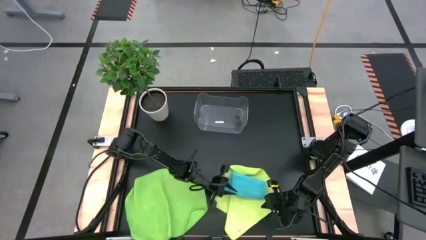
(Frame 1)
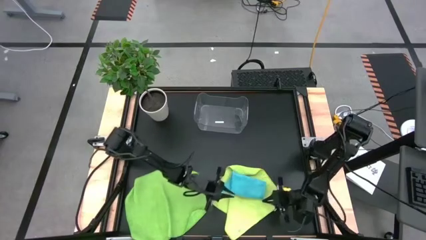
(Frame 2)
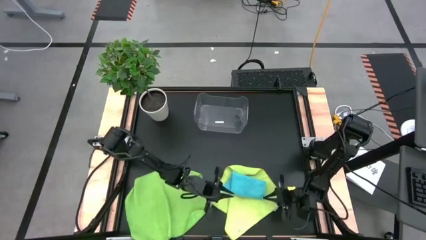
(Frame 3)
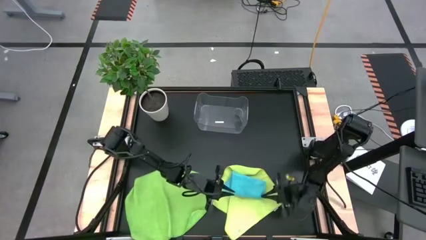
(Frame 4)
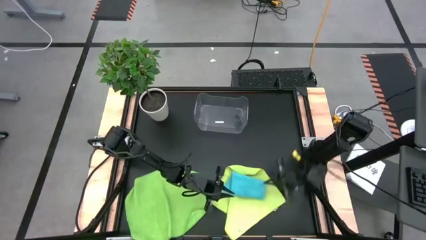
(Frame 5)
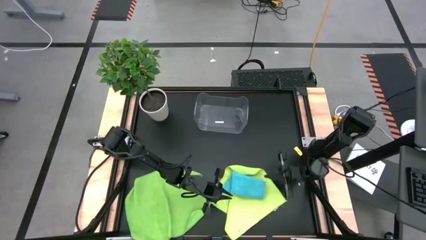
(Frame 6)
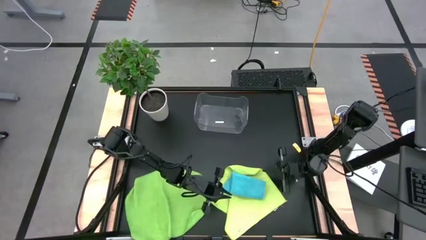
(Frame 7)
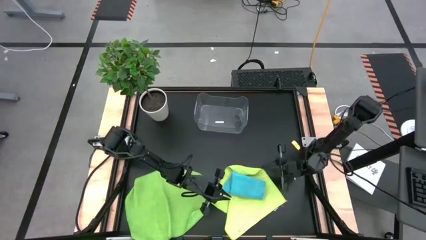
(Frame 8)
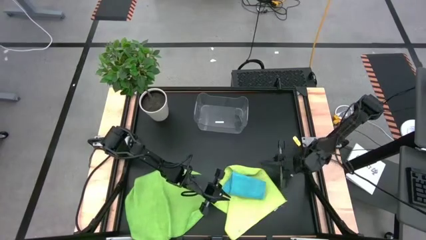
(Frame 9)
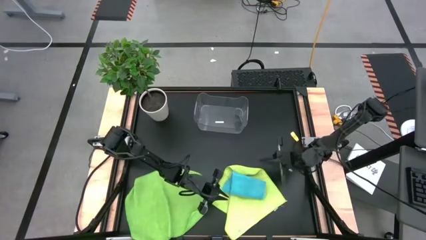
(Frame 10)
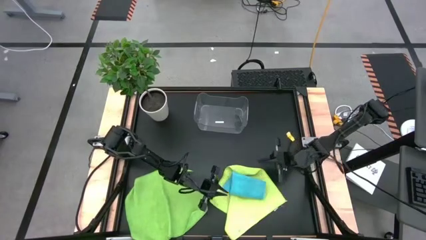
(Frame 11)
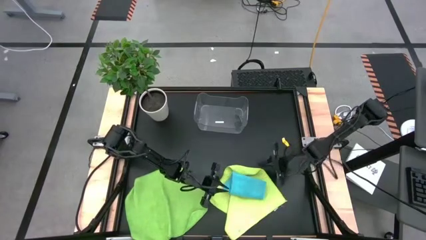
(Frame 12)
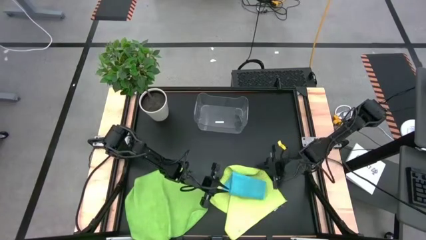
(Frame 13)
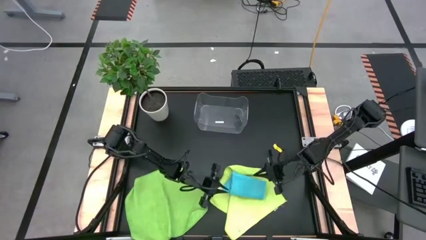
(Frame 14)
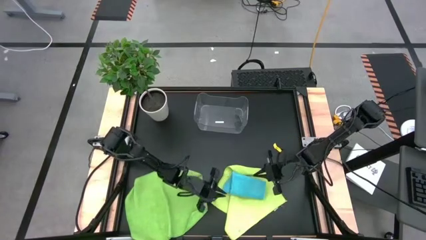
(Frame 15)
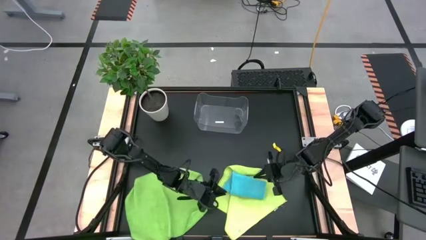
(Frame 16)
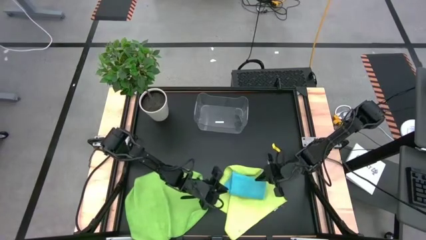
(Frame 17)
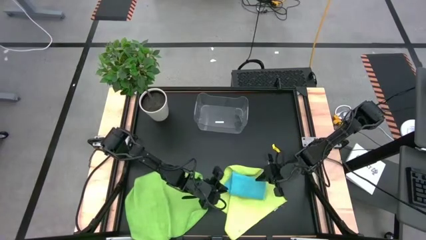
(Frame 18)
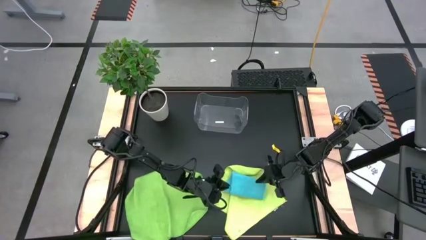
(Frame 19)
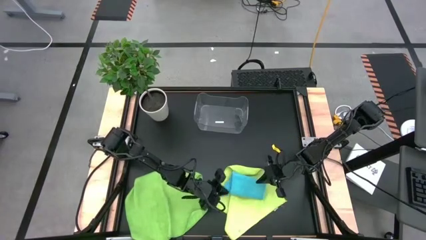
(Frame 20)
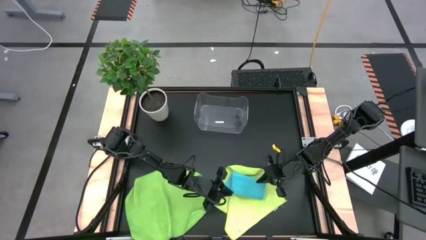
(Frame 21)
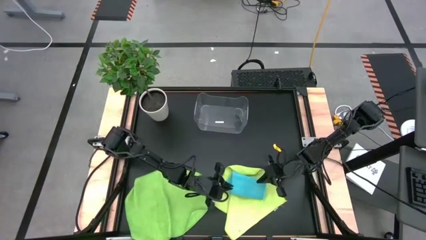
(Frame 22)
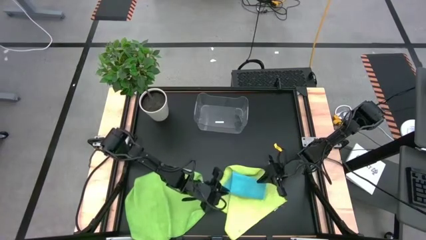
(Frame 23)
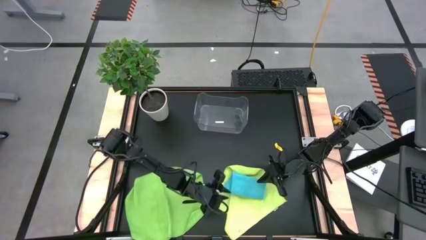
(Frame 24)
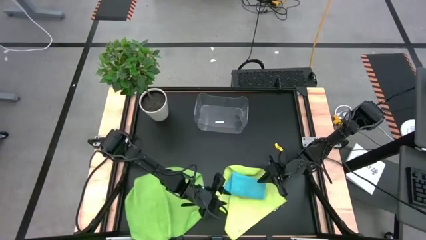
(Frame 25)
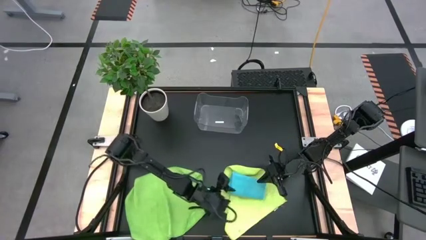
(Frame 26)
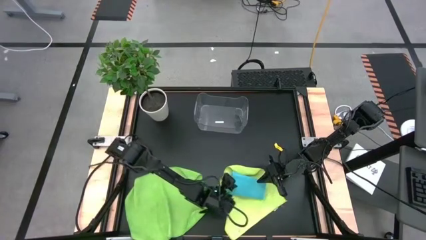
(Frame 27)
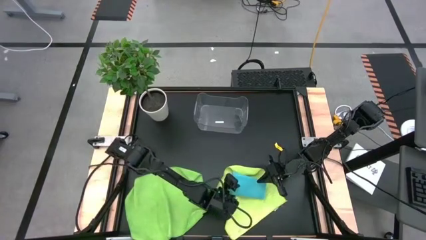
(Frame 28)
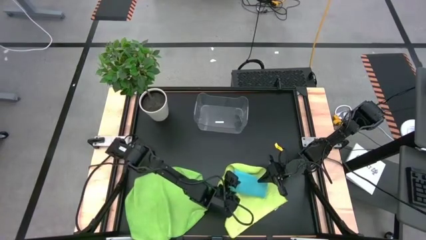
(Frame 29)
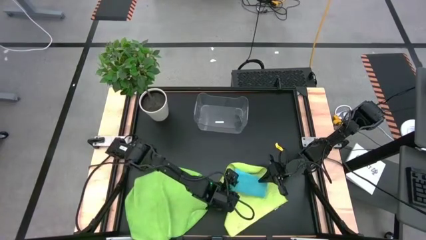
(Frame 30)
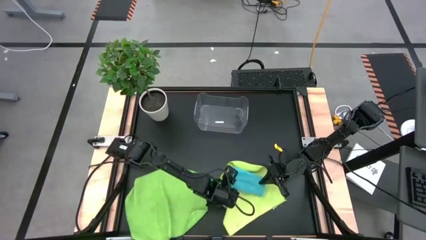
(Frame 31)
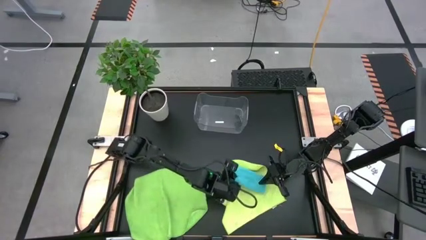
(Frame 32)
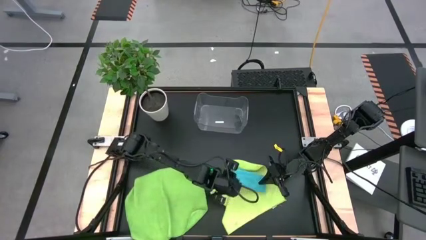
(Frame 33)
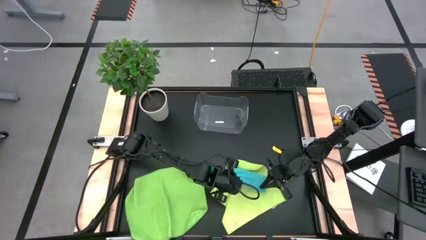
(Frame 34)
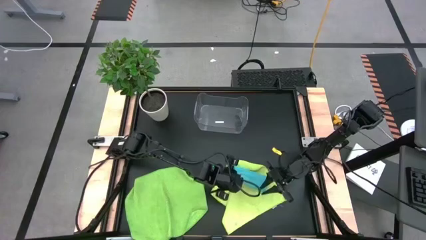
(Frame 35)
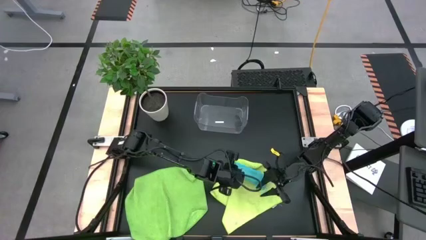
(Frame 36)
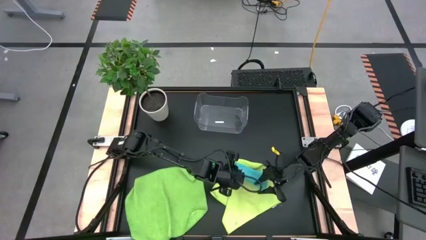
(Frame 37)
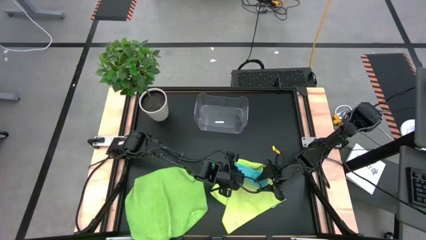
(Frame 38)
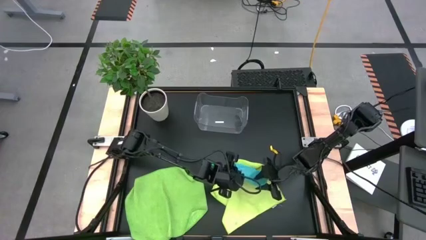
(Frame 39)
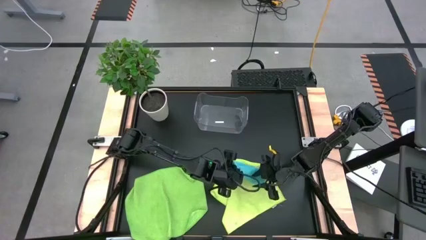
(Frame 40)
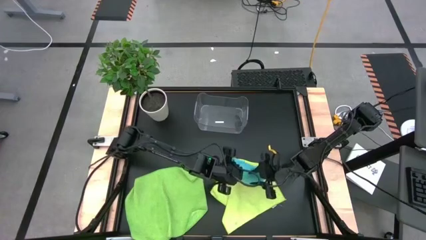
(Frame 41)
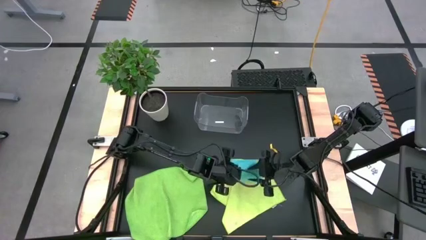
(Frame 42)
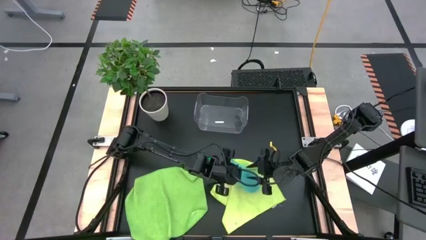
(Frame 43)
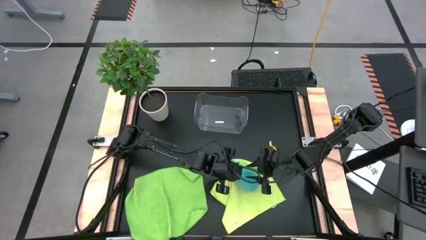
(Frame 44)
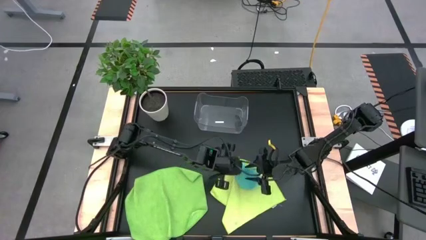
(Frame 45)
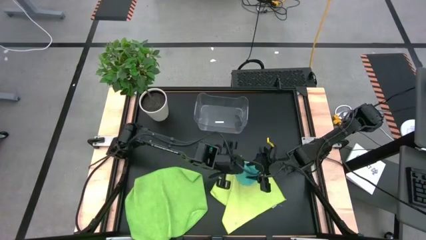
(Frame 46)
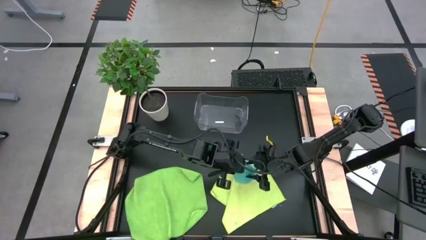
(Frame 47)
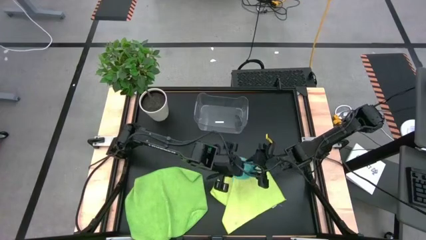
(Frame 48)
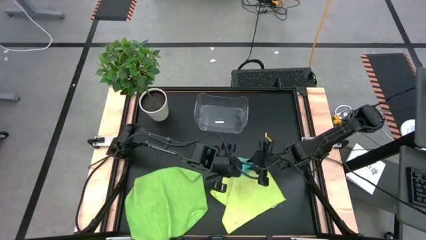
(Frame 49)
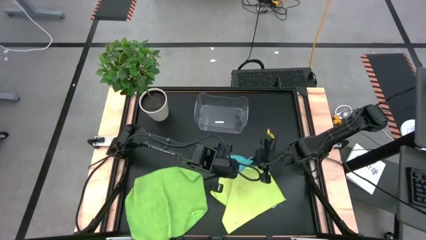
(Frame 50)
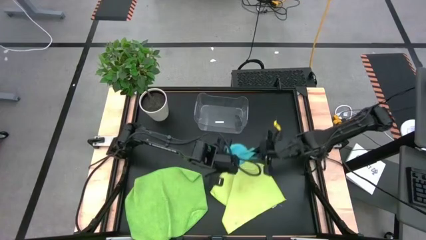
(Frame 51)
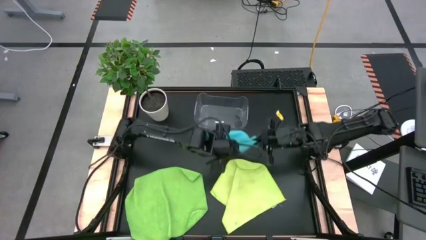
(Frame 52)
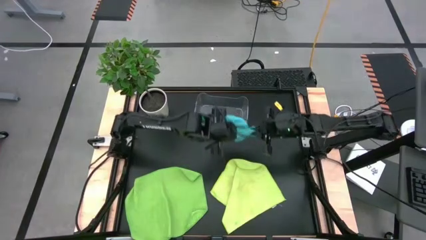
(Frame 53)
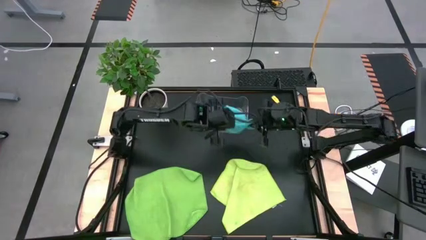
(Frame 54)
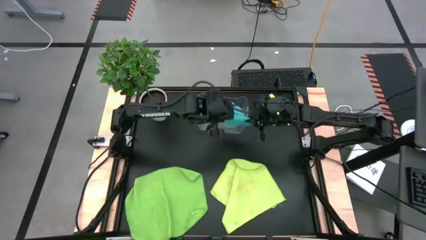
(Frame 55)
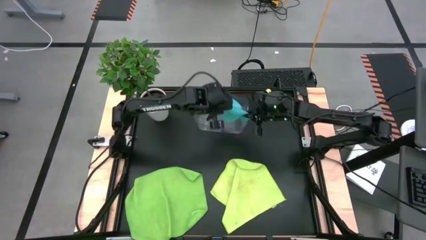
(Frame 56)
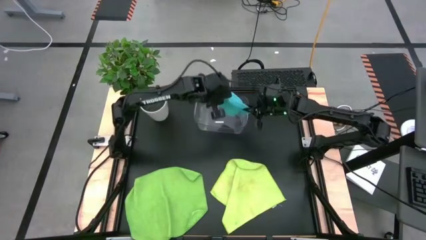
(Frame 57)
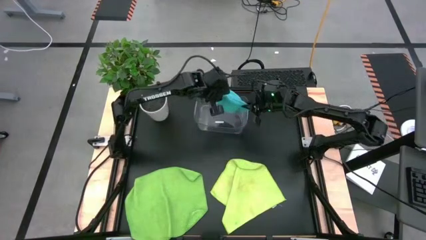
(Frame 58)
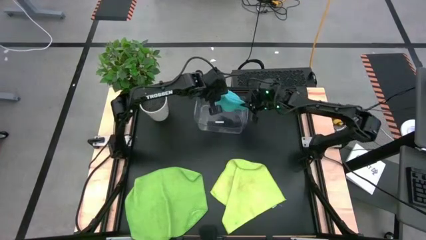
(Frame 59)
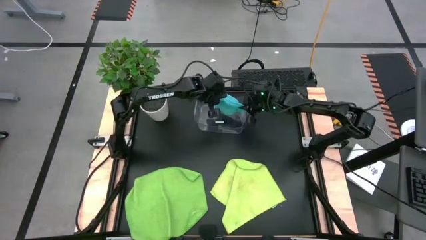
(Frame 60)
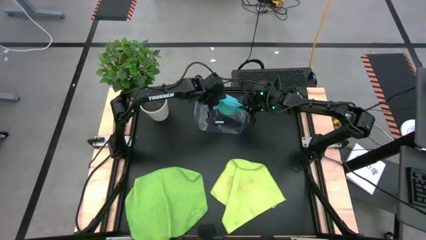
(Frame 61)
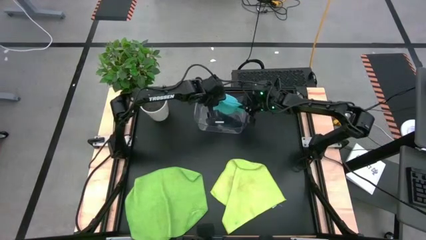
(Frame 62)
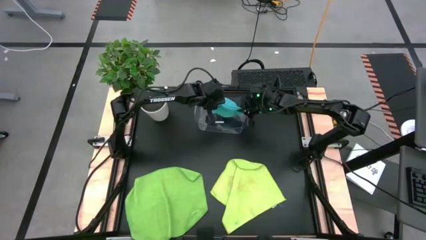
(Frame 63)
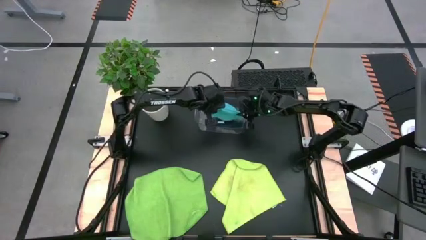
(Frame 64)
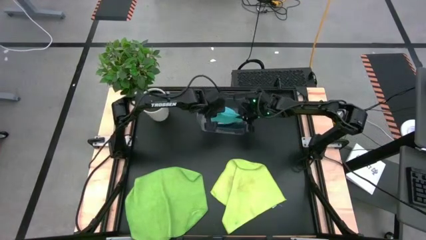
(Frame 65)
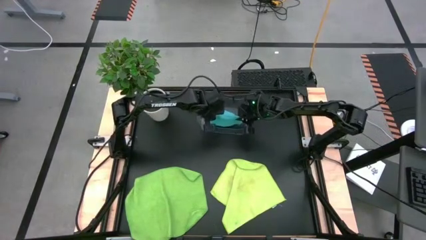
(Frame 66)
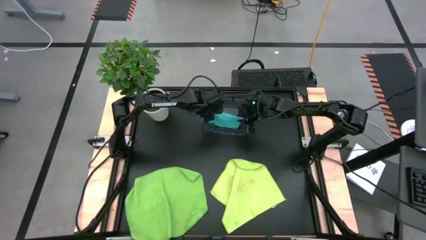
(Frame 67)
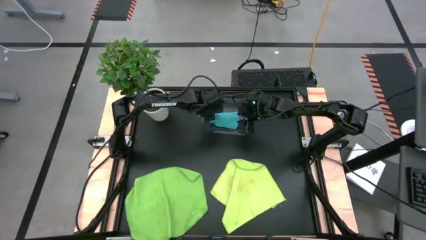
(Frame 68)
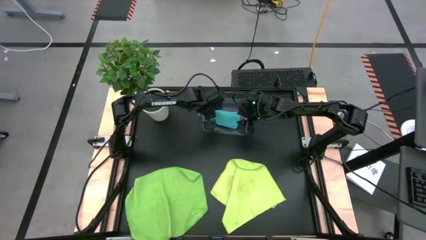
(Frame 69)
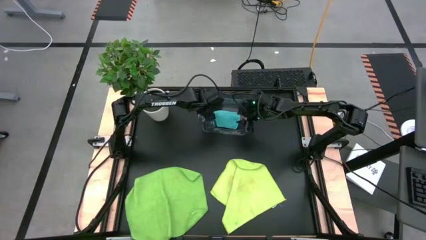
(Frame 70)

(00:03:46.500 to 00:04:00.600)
Task: Fold microfiber towels
Put the blue towel into the transparent bin

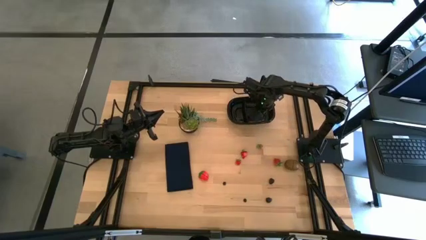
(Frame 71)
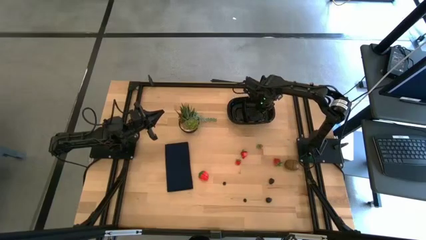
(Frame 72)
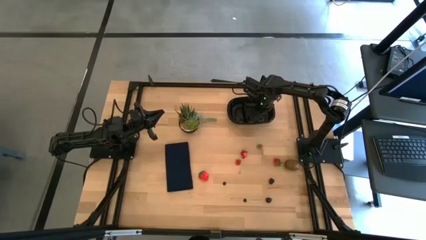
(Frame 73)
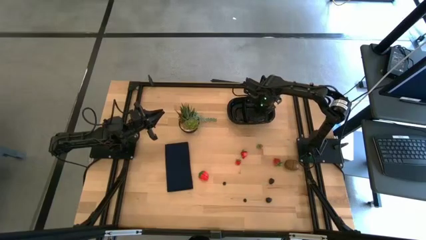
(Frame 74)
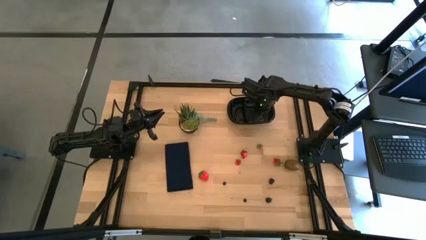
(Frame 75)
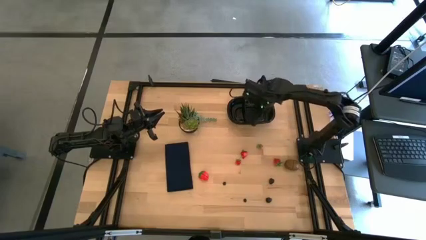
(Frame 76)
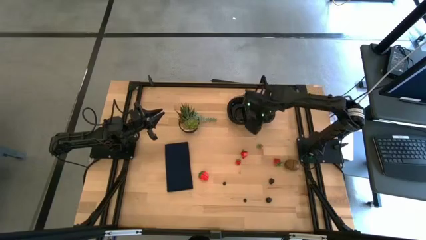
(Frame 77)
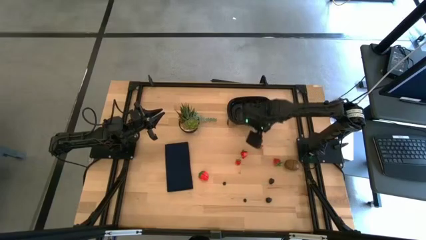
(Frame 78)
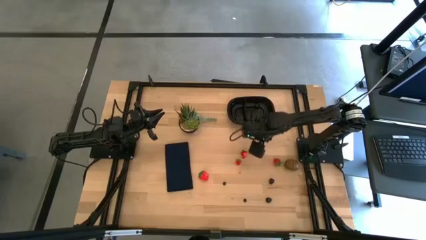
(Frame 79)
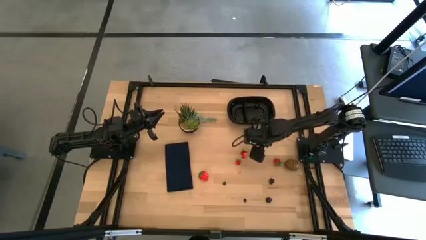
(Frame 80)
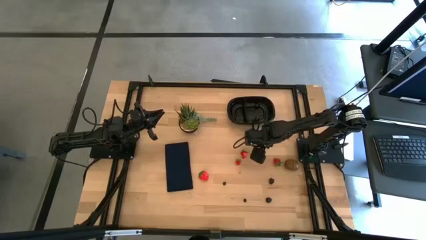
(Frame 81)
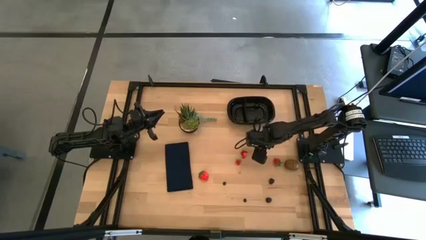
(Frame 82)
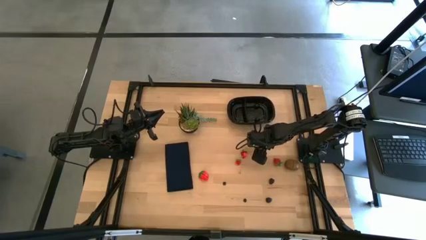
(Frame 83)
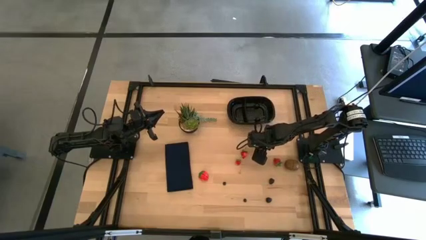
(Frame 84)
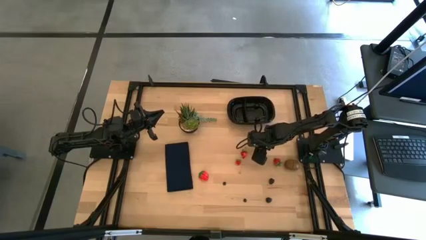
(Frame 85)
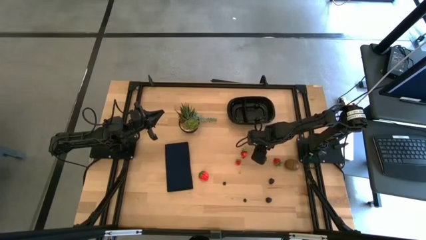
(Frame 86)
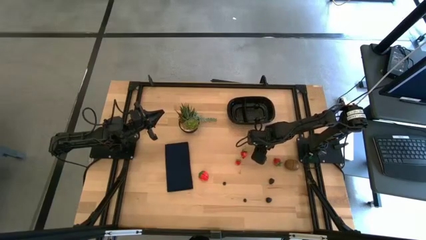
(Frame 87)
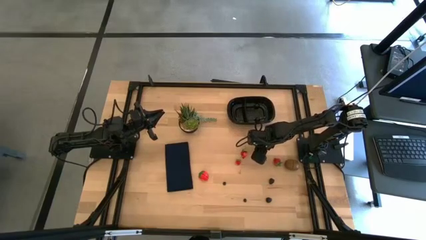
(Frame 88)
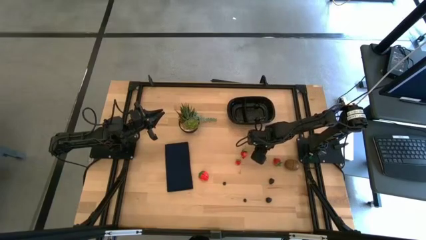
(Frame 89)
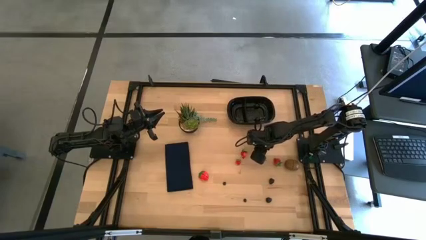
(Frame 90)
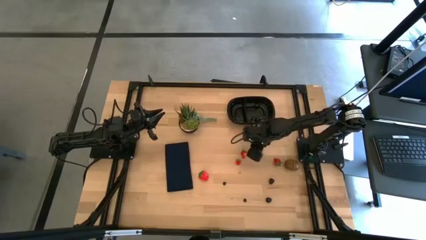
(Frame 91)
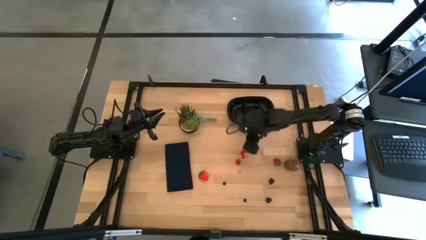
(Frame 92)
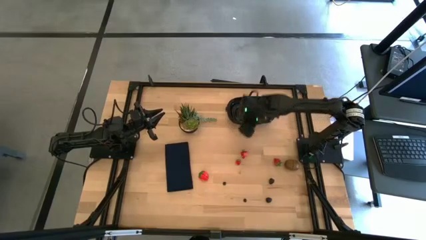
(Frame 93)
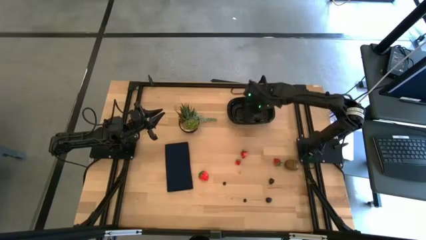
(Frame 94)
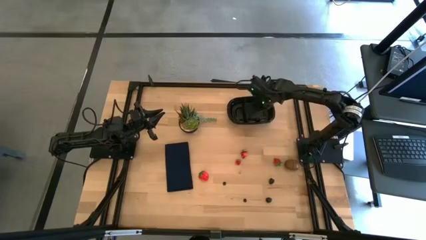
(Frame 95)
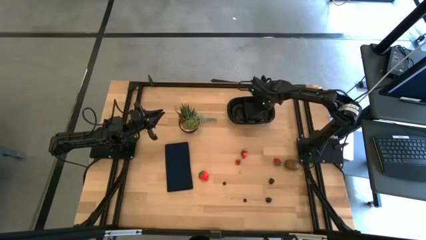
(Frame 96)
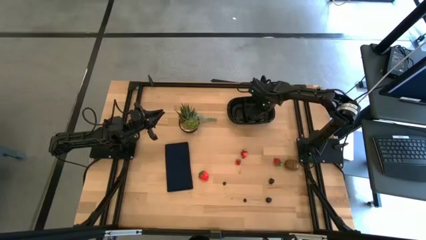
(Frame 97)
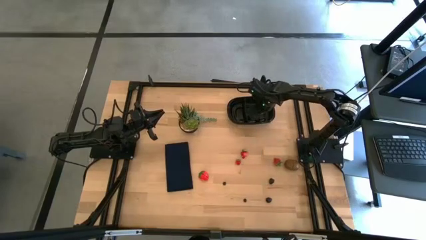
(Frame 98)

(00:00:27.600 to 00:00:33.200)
Task: Pick and placing Produce into tupperware
Put the strawberry into the black container
